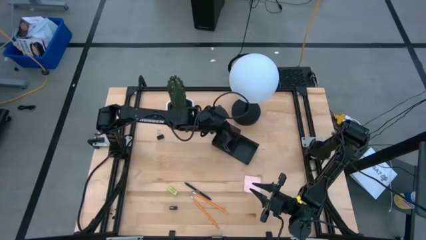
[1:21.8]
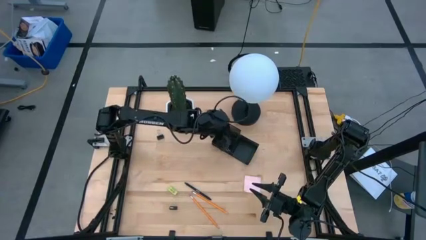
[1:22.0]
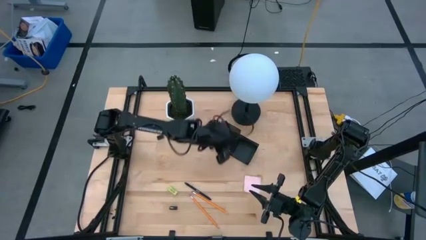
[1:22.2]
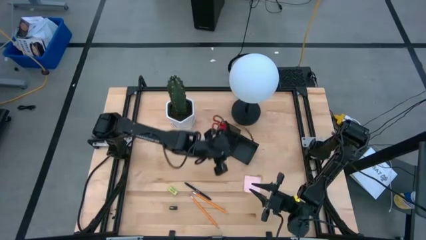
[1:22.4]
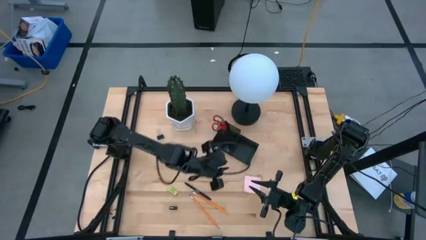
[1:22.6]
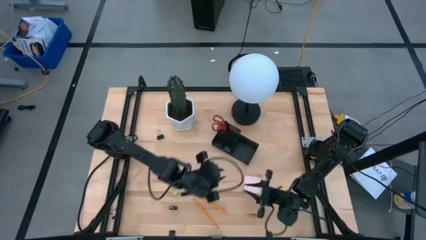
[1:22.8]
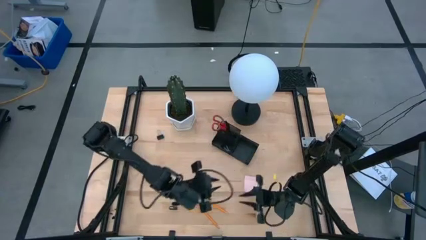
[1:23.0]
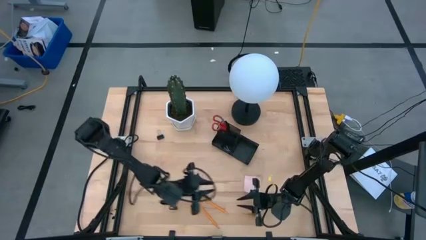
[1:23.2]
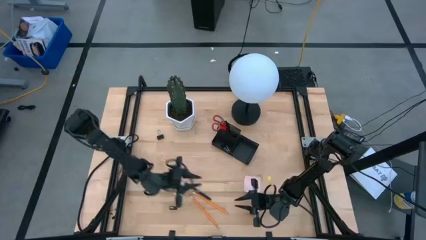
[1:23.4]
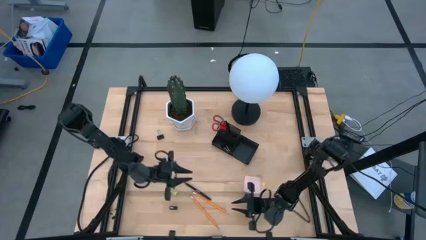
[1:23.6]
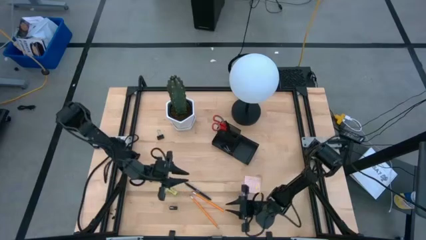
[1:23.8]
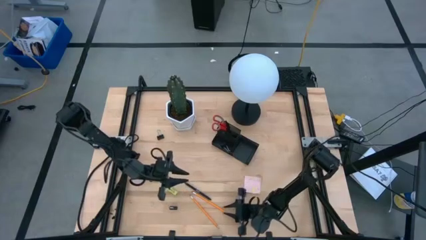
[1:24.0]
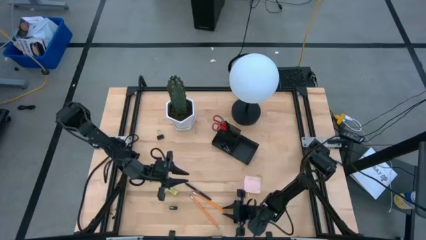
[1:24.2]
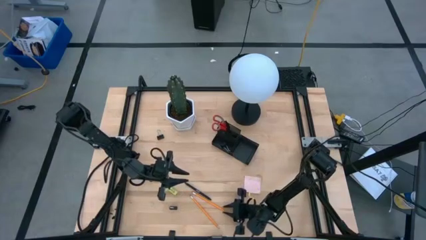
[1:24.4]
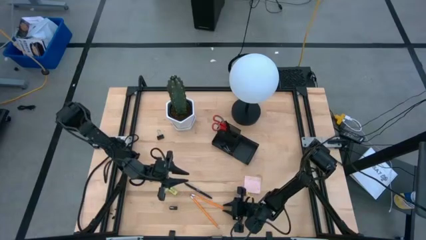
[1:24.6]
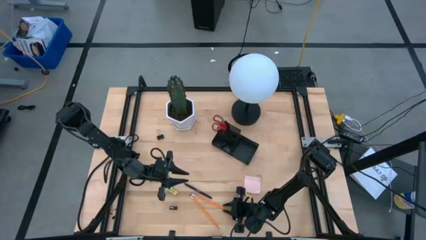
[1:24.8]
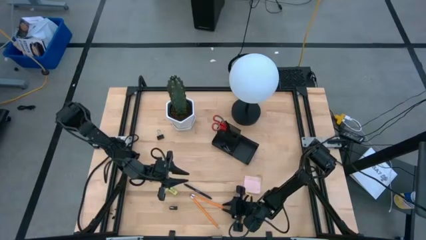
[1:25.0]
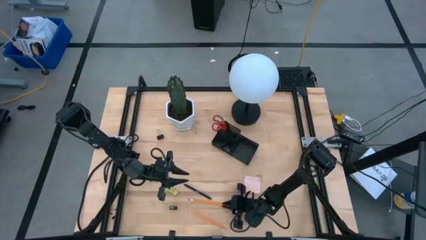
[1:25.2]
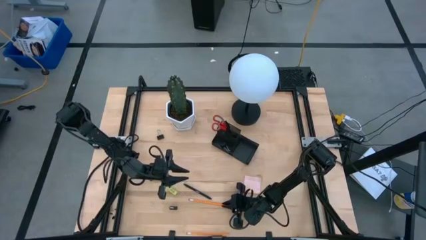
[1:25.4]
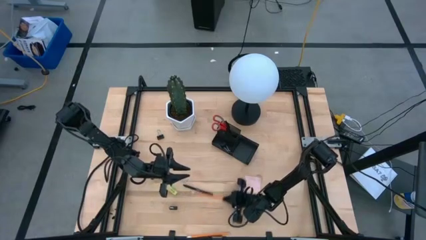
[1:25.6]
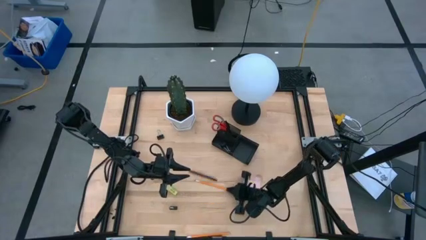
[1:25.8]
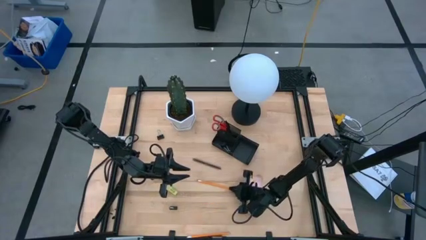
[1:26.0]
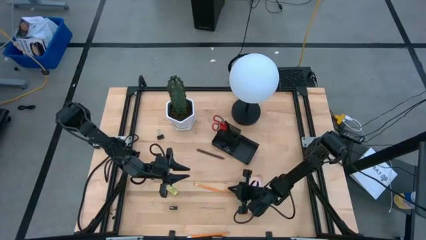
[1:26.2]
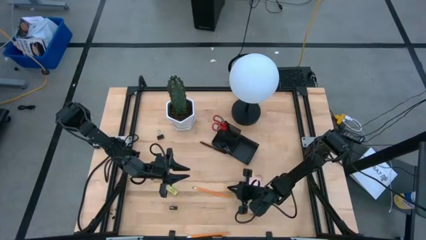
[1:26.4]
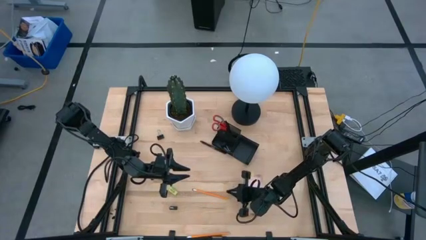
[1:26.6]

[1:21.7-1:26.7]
Task: Pick and place office supplies into organizer
Put the orange pencil into the black desk organizer

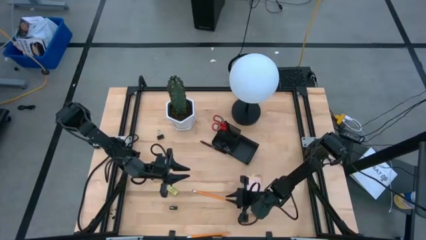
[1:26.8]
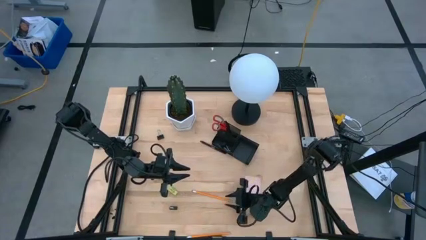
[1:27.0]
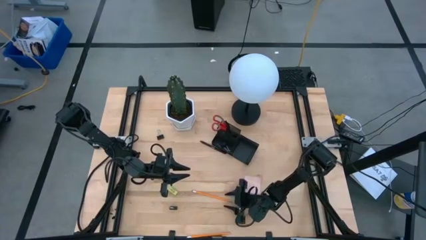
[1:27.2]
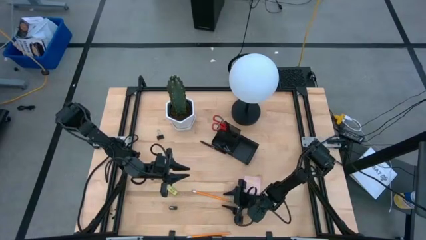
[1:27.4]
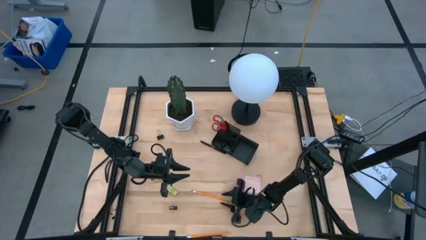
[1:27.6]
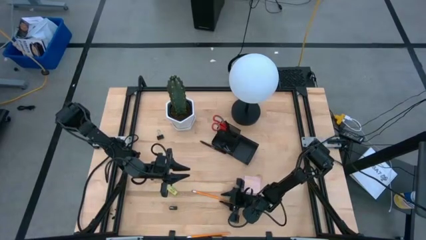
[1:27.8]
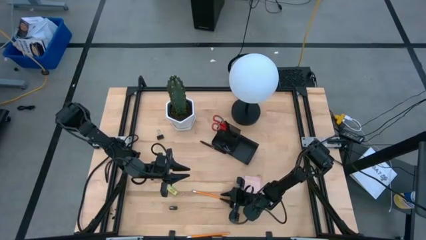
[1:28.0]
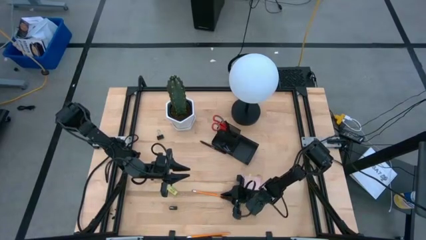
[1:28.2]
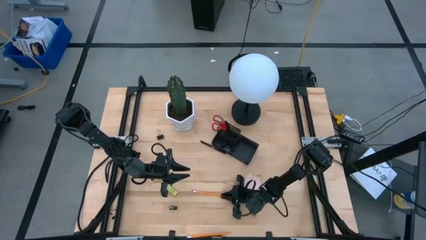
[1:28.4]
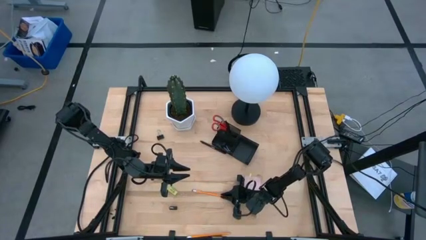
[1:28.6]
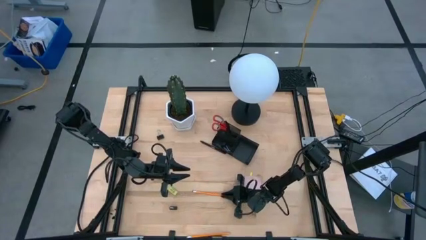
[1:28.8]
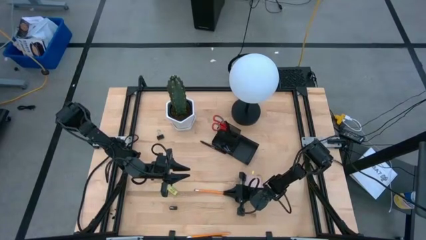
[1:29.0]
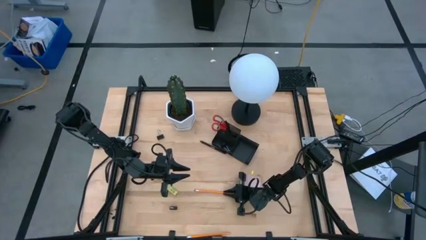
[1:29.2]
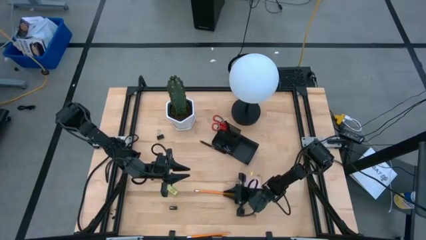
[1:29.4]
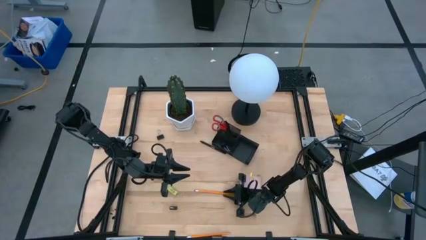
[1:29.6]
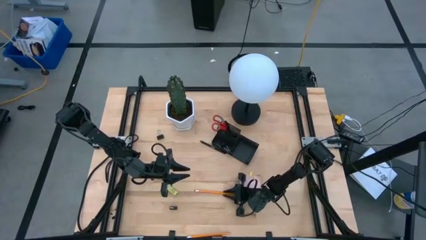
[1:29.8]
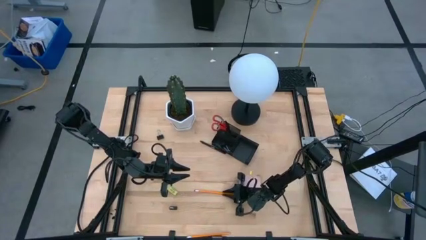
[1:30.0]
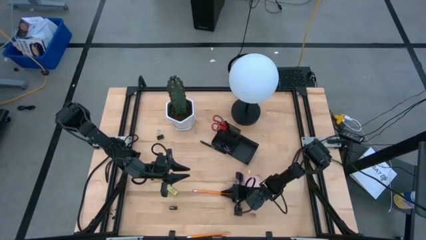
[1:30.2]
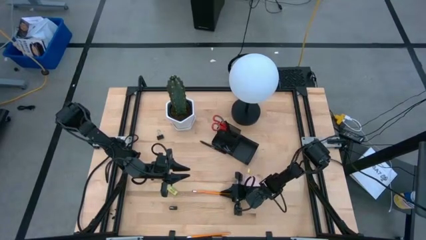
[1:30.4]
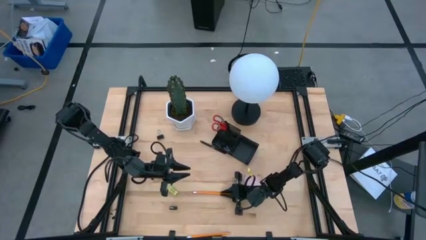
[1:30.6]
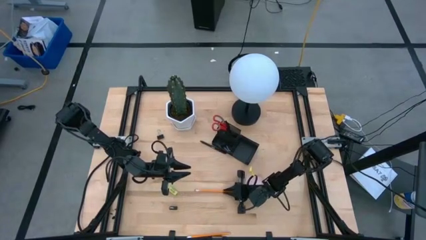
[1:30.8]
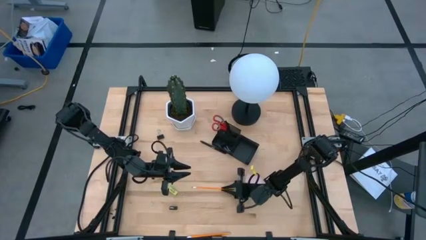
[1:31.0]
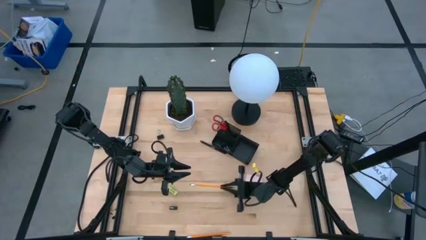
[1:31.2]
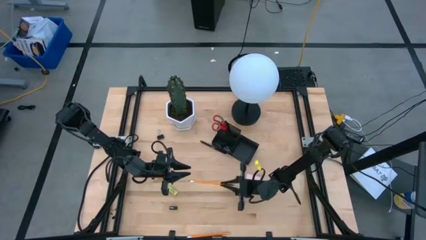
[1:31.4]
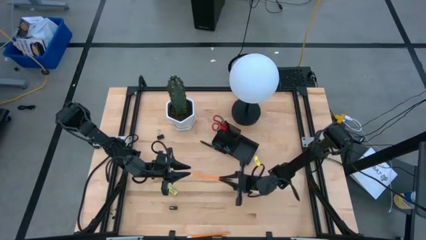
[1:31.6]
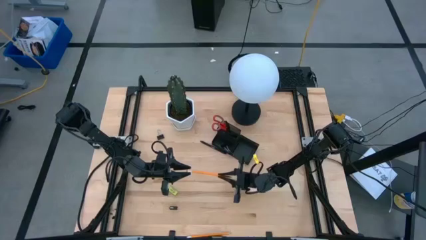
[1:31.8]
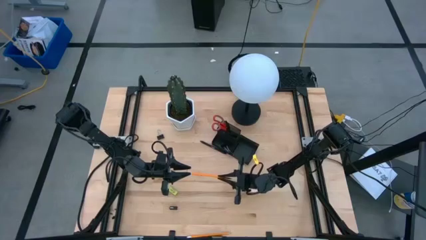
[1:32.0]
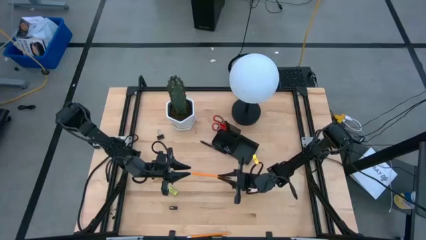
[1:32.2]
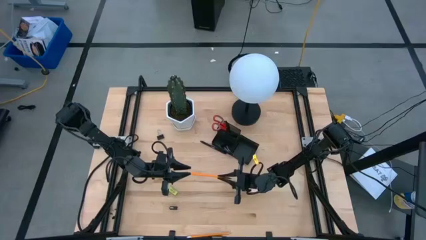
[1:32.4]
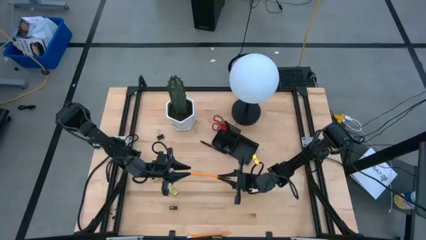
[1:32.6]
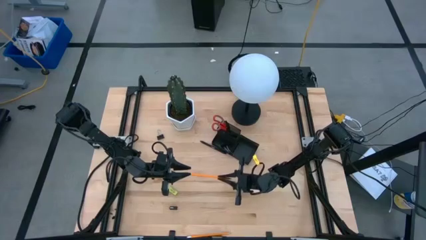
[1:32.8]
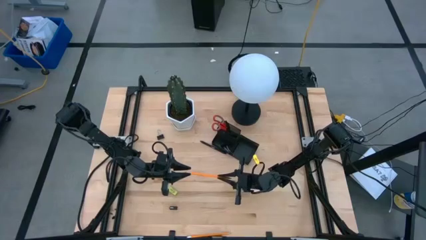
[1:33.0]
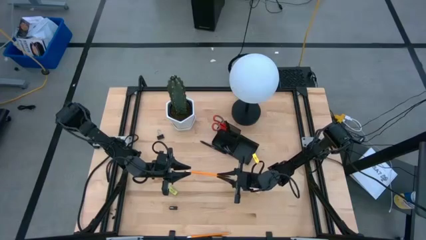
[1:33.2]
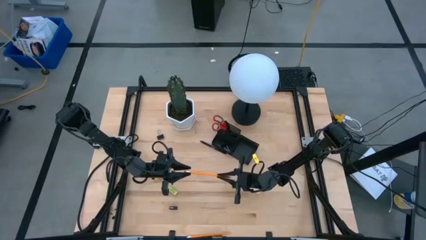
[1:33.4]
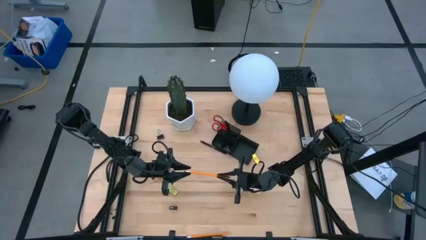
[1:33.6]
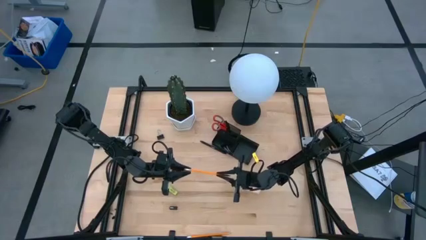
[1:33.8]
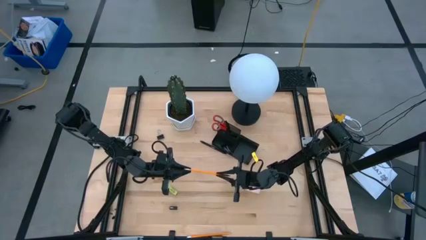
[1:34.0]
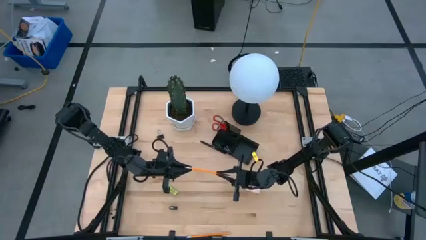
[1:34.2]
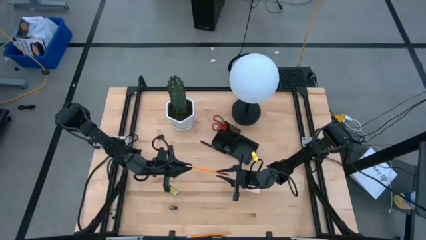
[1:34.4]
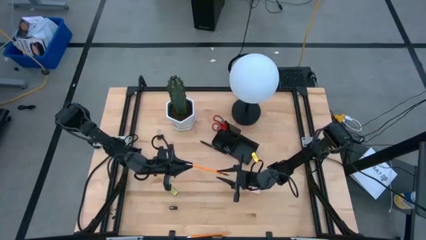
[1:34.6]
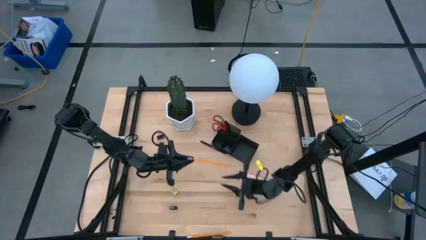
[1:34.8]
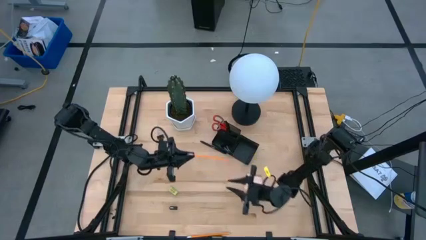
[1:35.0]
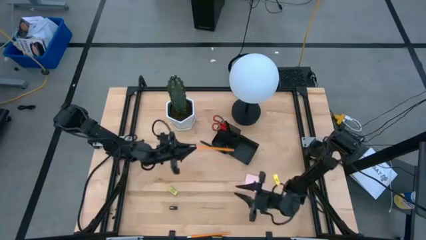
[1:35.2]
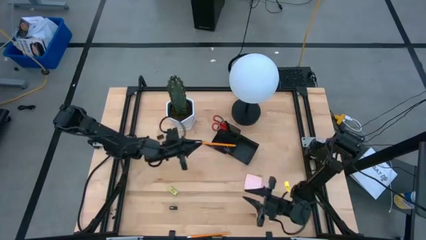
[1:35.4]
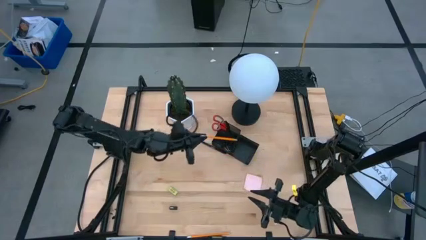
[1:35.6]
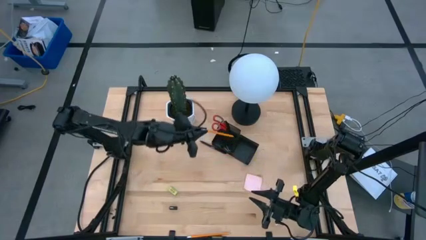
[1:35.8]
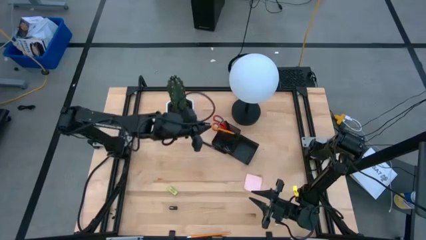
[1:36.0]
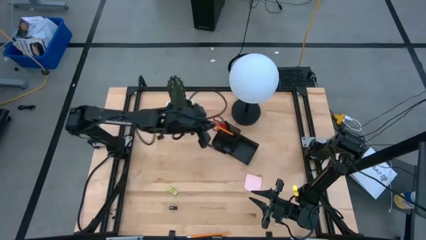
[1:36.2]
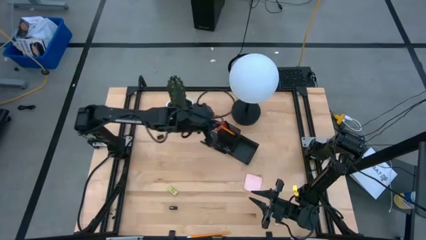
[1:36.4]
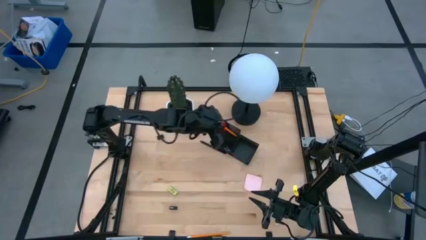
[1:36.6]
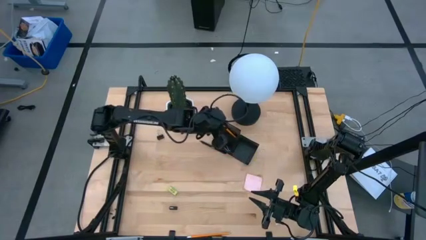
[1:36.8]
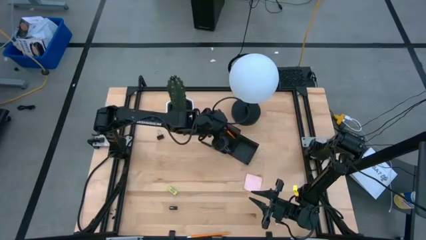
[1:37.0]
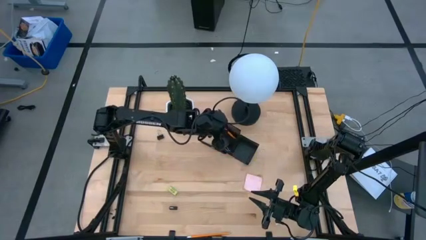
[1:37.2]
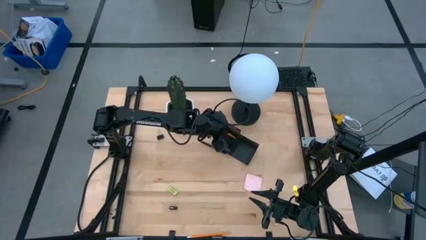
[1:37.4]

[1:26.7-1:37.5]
Put the orange pencil into the black desk organizer

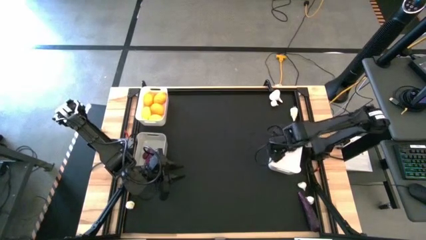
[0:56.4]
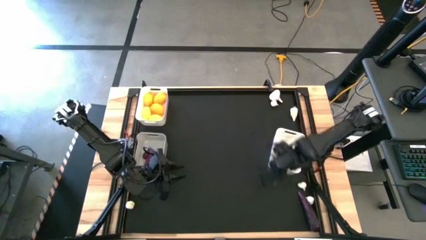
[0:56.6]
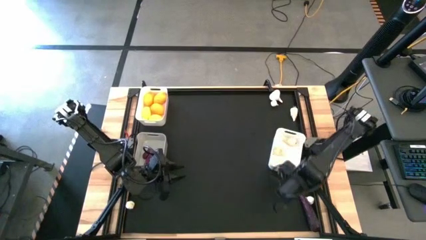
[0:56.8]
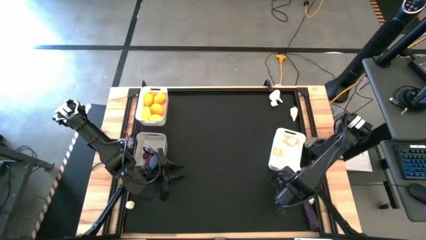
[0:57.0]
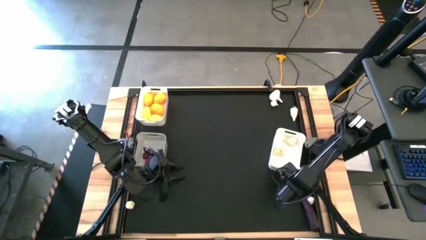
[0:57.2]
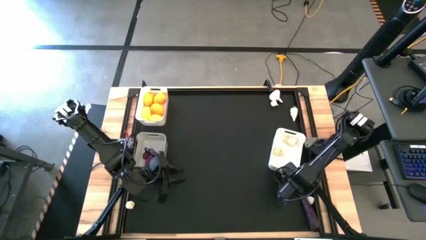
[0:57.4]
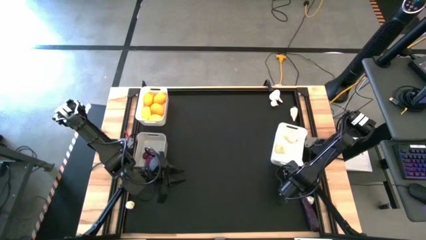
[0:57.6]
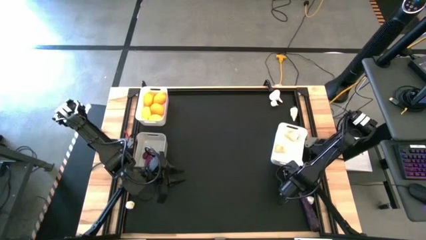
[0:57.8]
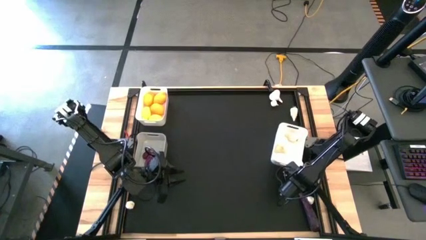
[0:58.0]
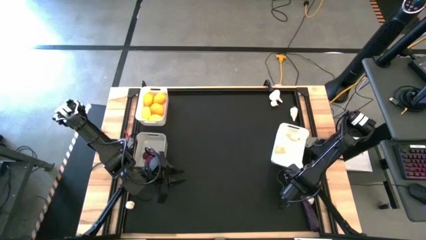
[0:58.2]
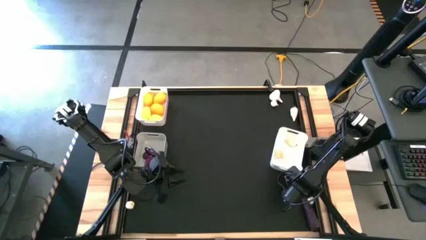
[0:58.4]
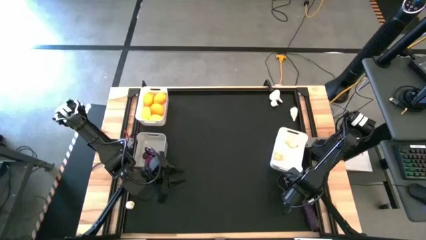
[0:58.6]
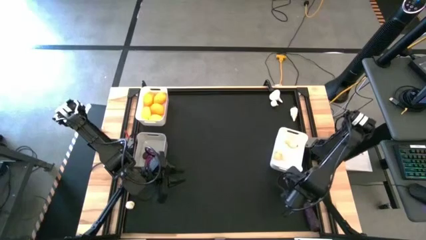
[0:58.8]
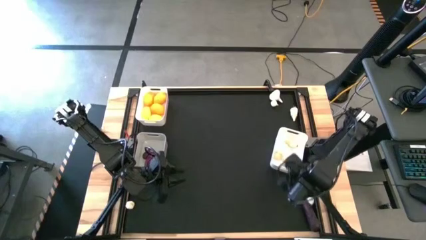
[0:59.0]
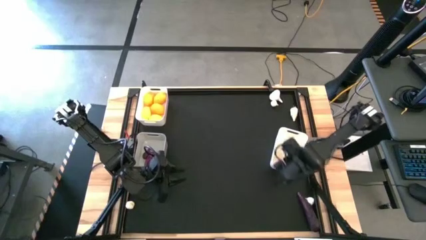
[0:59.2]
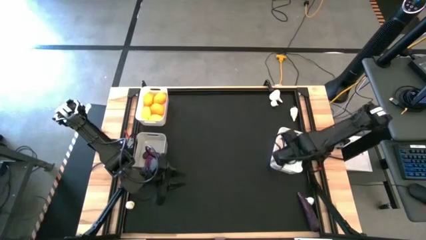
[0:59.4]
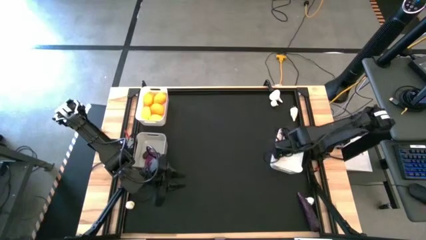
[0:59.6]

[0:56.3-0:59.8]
Task: Sort produce into baskets
Put the white garlic into the bottom white bin
